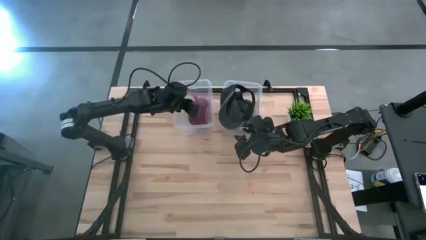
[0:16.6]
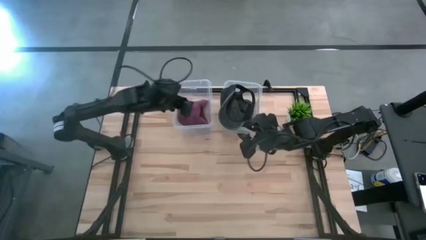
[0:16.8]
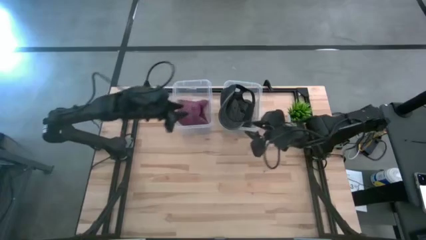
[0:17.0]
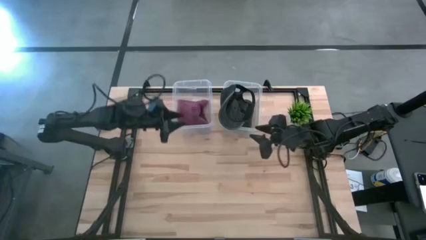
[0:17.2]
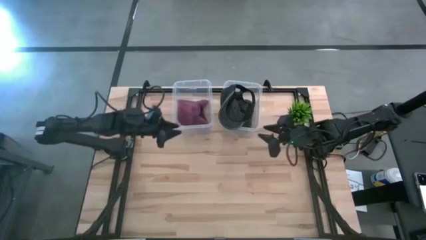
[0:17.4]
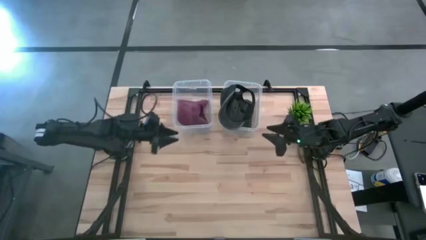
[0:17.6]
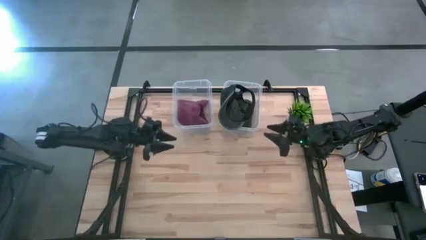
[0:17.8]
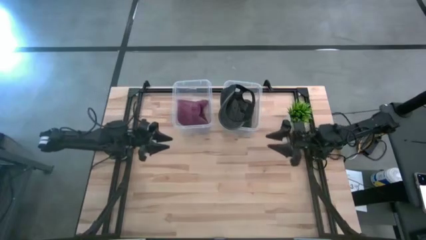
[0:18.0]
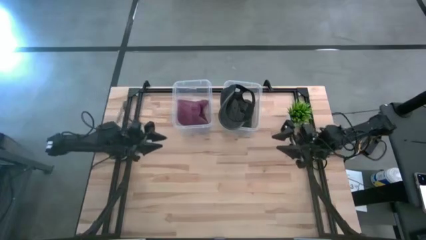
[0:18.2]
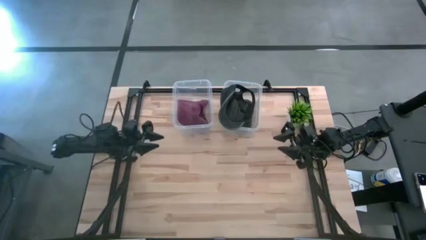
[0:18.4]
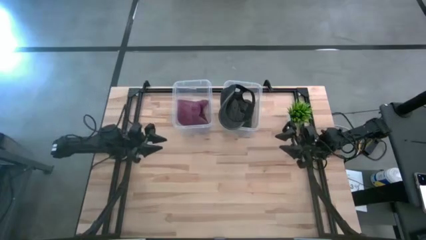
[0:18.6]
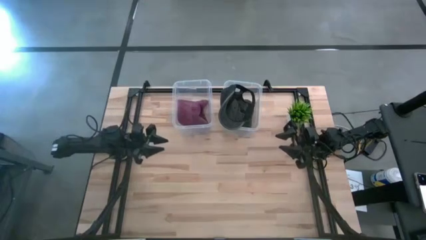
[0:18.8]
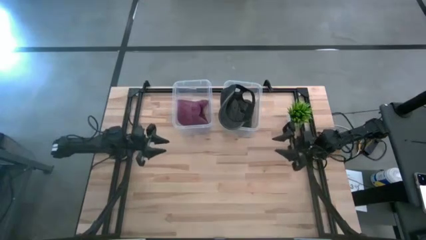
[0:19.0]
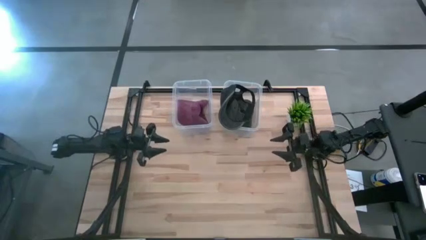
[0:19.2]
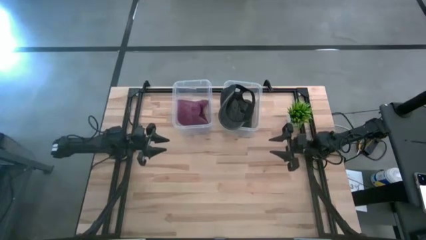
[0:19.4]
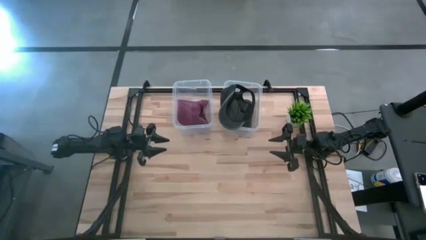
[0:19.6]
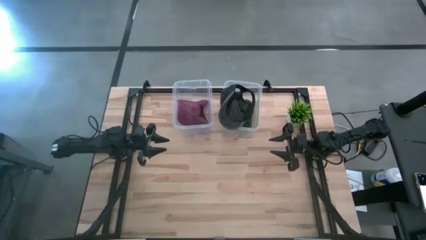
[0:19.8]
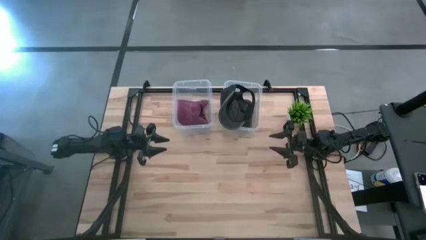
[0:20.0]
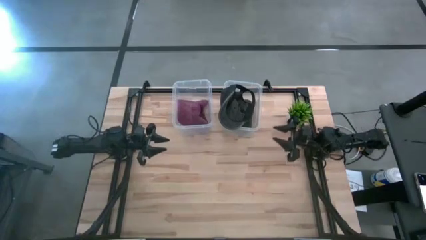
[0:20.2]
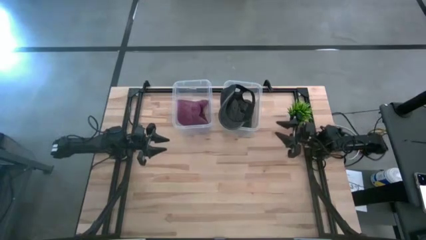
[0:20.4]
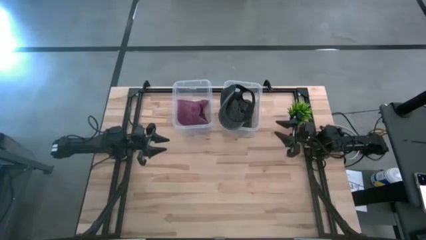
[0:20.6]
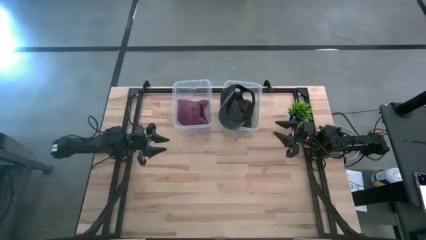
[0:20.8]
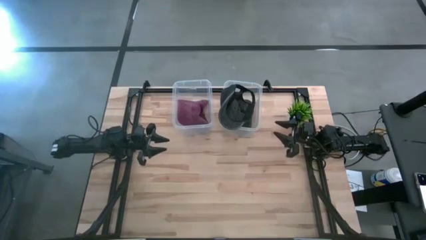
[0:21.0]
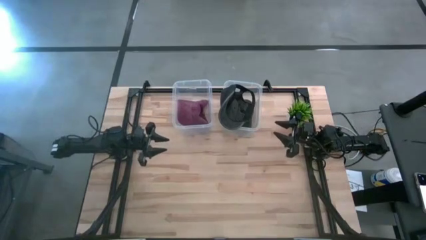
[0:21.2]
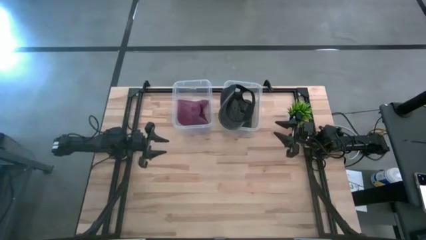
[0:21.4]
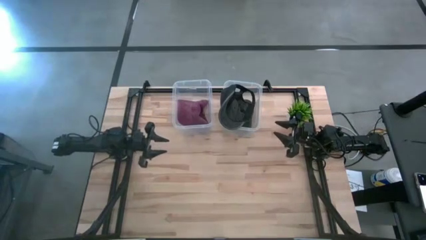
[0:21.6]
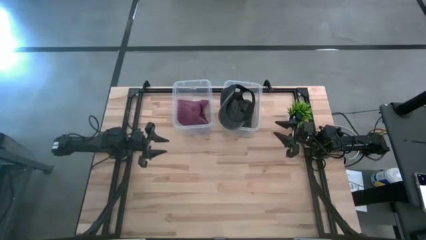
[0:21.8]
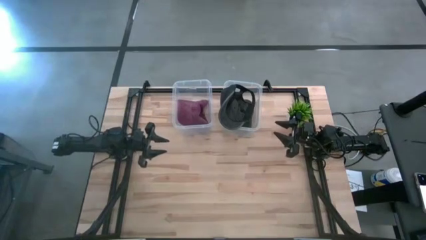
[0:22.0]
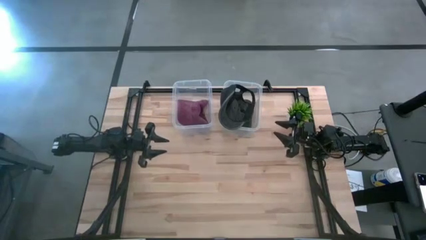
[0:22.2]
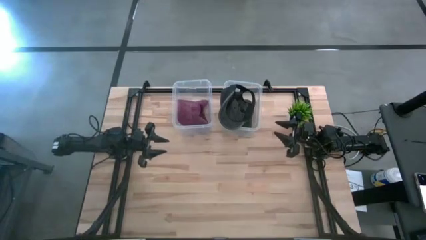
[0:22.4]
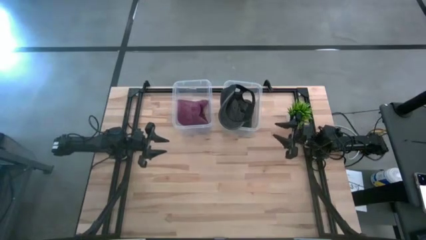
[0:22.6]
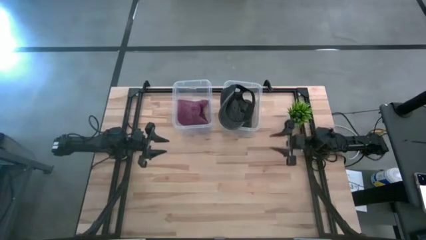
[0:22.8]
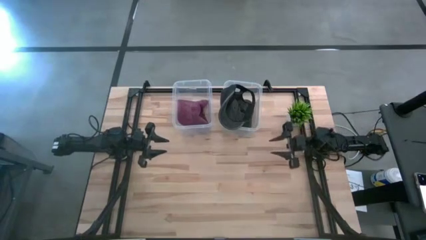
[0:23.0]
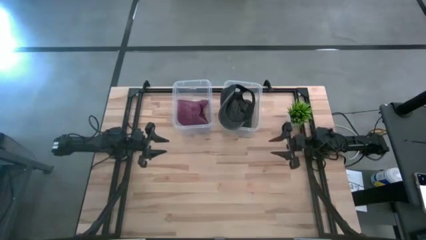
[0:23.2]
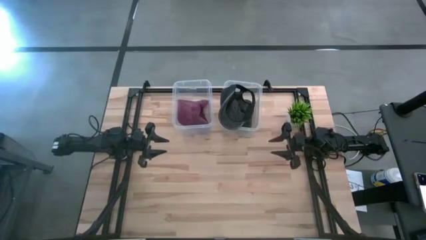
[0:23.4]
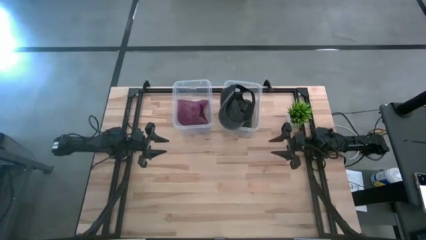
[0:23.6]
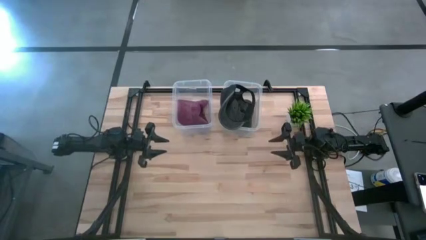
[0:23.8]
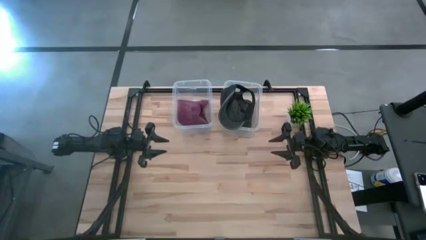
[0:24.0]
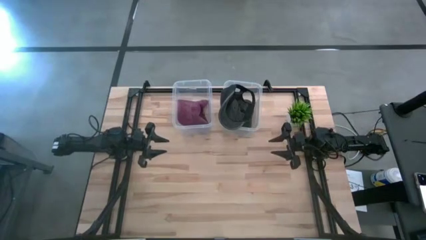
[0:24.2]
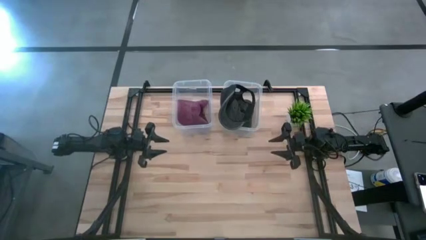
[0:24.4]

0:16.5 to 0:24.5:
Task: Pick & Place hat
Return to Home Position

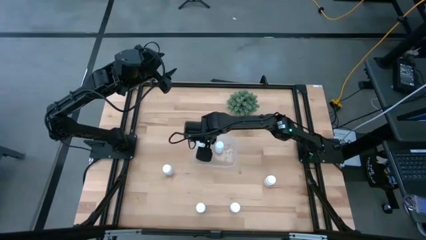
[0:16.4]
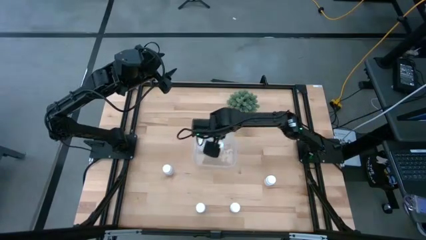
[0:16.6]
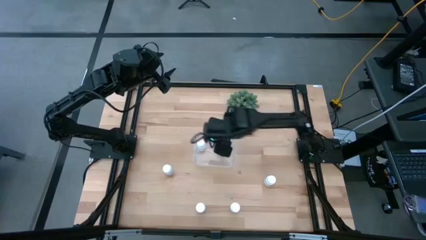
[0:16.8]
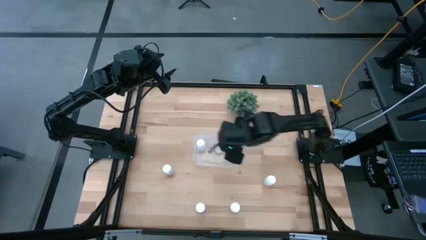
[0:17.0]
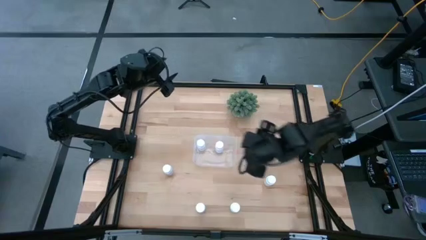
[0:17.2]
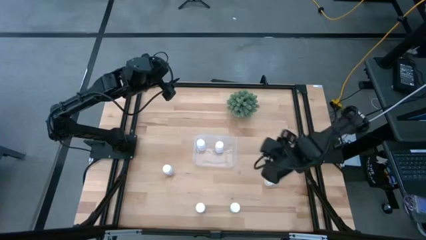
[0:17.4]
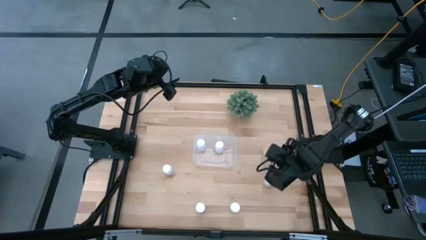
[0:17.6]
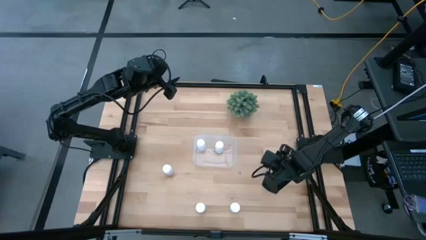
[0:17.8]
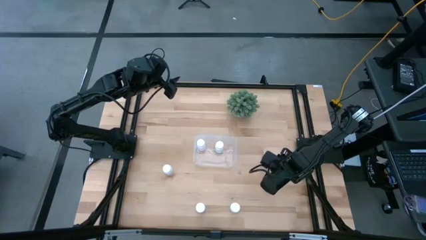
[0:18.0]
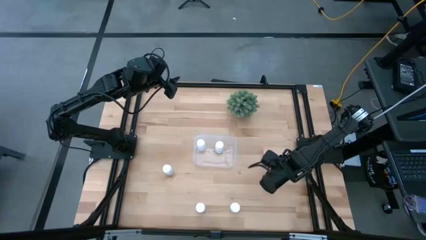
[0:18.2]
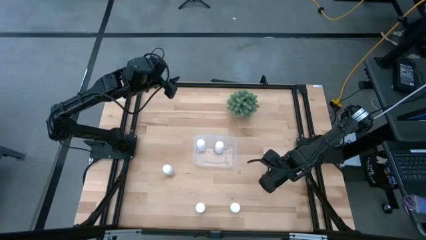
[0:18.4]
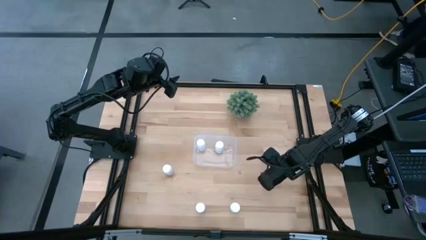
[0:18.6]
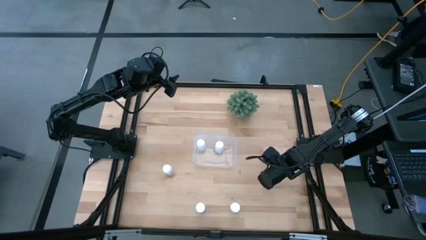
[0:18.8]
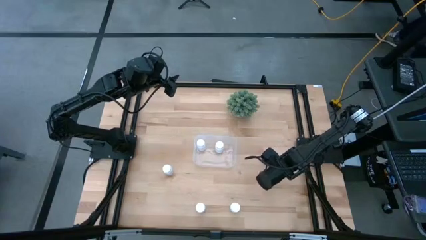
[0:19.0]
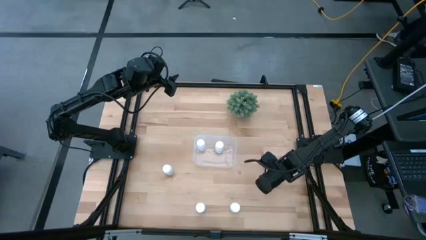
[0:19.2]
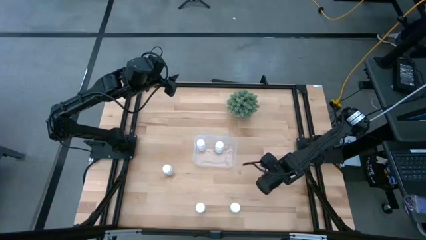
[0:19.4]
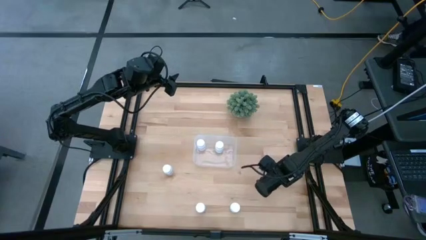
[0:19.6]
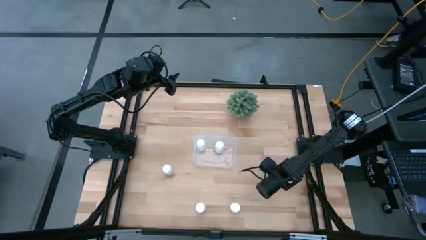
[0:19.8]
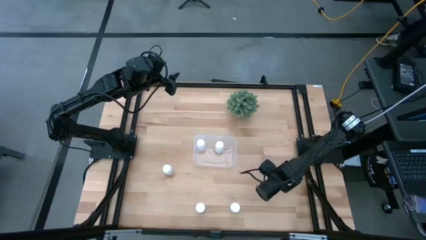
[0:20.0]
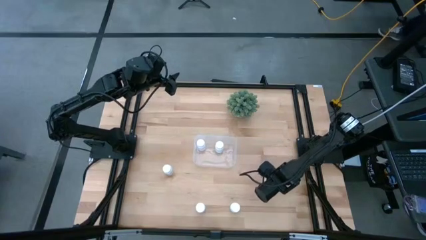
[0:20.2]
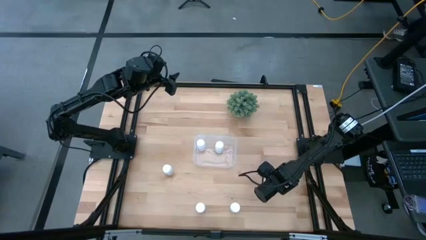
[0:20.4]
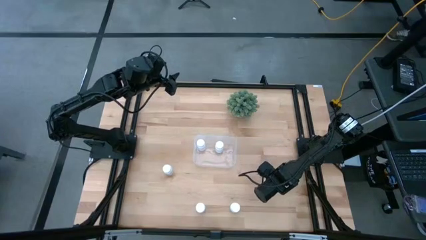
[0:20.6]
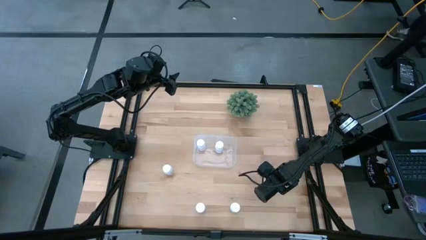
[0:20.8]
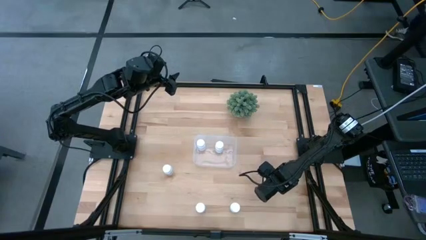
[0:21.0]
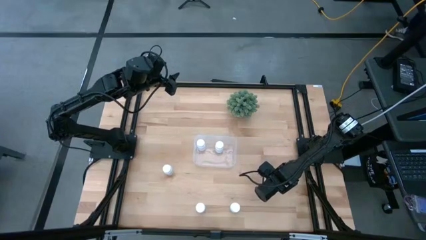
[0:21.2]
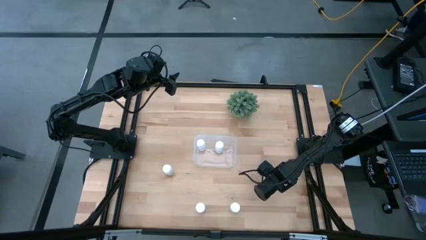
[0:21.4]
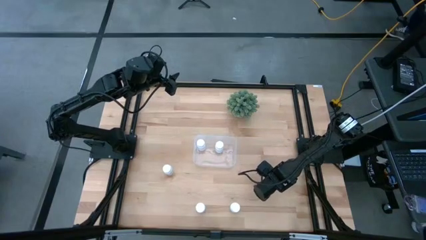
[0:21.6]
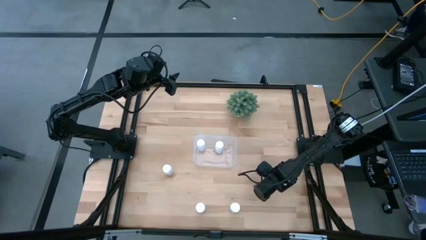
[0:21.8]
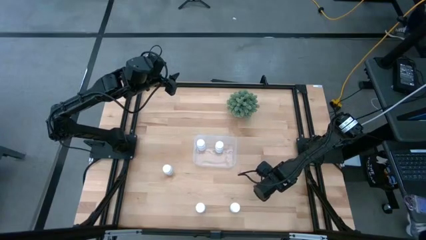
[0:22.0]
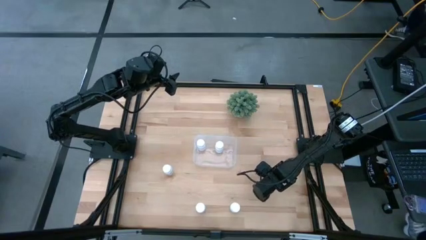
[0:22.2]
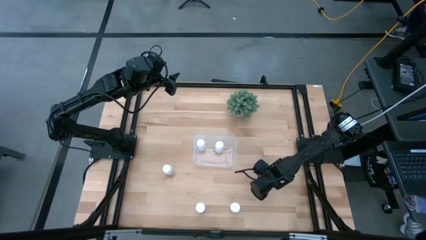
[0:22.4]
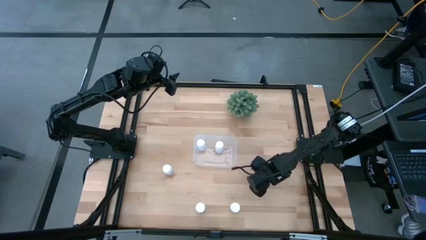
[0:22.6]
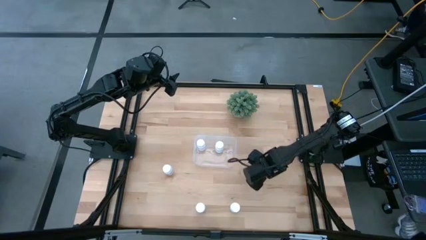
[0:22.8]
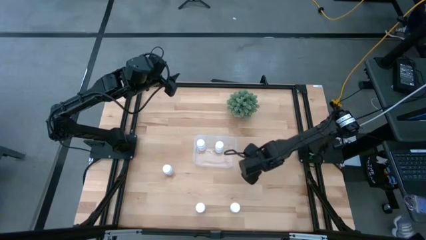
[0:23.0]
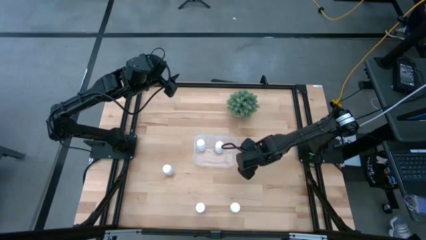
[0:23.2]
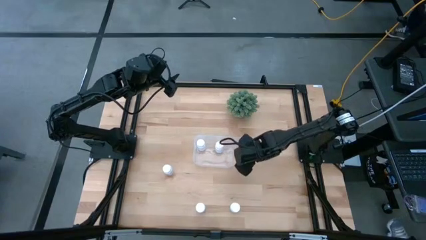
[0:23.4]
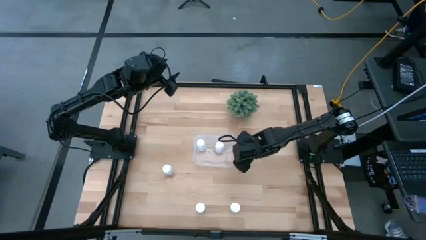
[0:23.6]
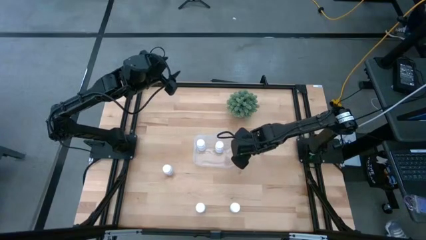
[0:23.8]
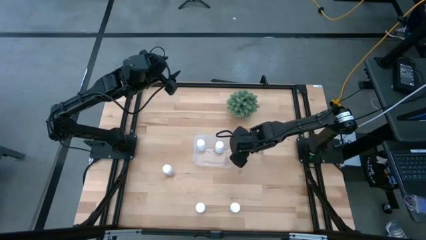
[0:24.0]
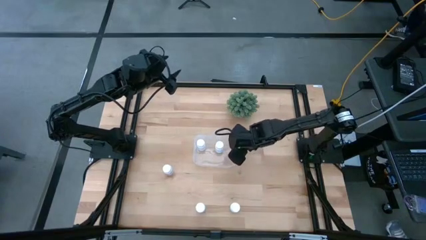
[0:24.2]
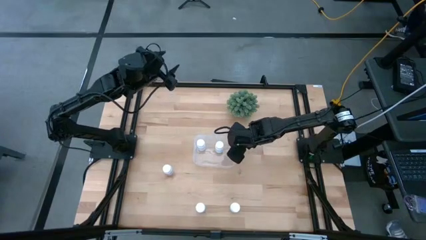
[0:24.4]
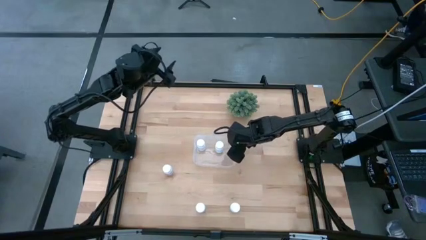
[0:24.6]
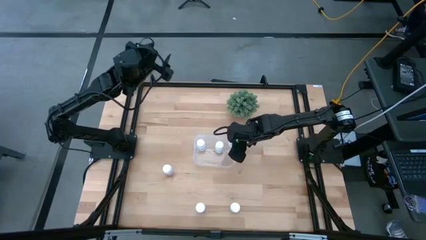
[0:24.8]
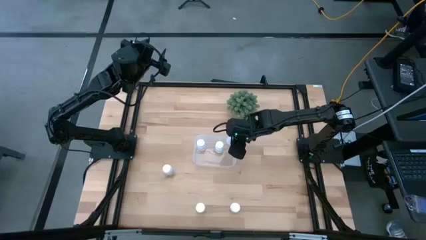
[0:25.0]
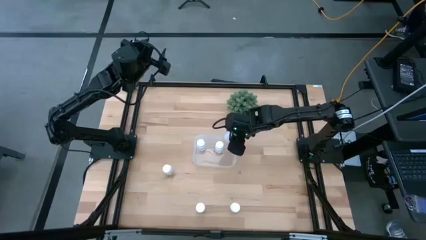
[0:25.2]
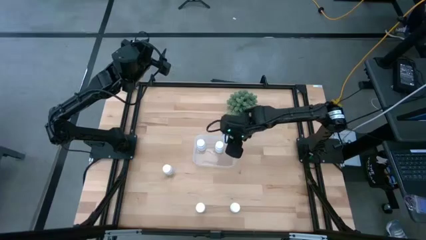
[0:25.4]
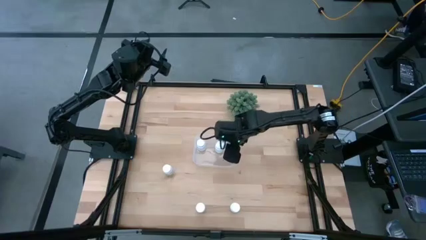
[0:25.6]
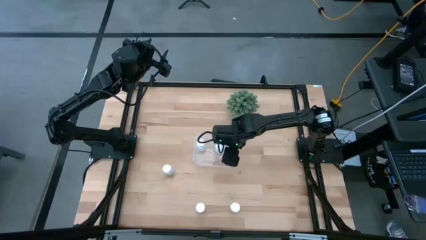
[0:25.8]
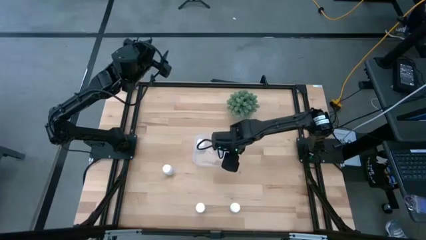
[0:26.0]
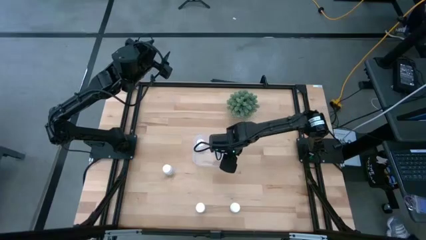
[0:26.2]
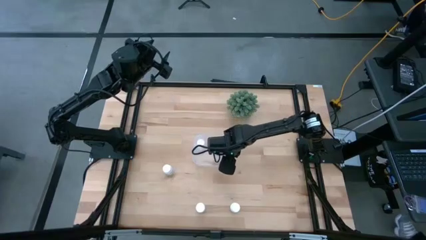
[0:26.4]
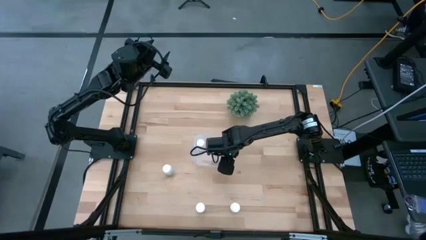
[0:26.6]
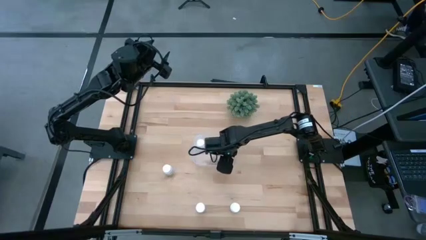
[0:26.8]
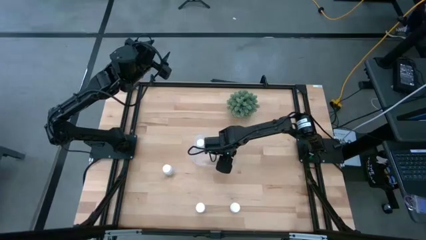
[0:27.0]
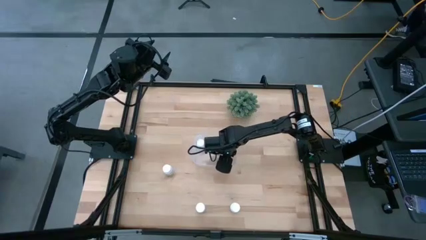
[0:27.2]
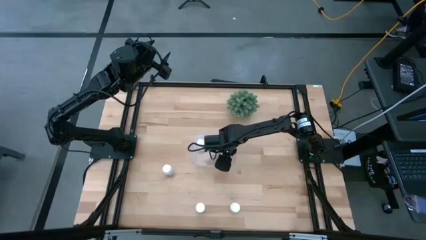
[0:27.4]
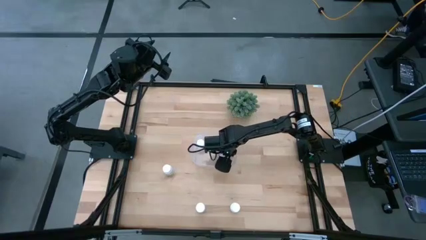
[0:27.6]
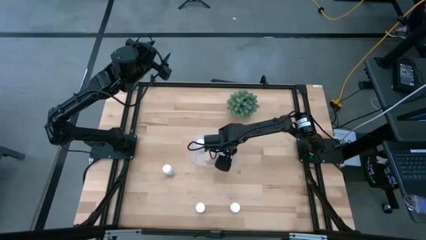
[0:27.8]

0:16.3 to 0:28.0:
Task: Pick and place pill bottles into a basket
Put the white pill bottle into the transparent bin
